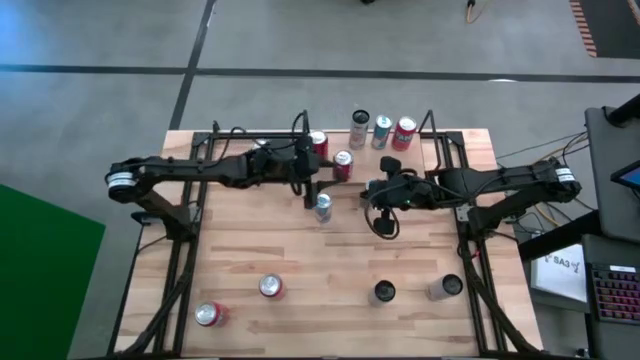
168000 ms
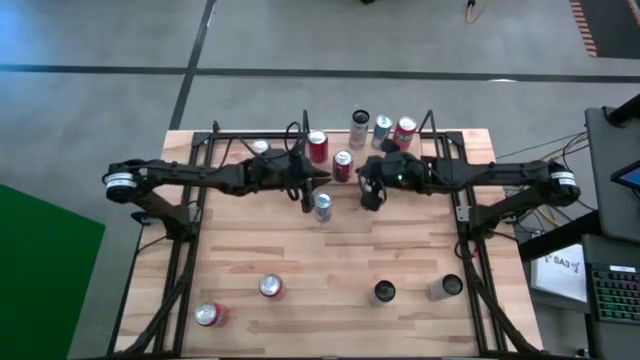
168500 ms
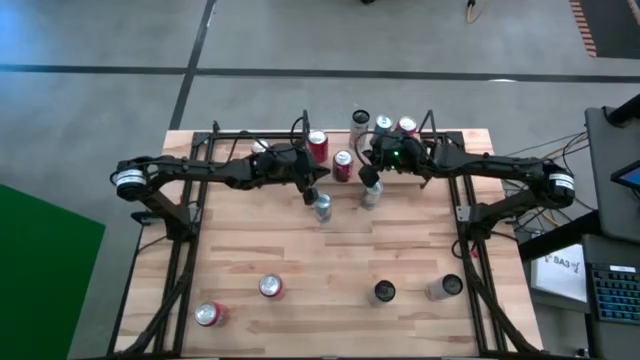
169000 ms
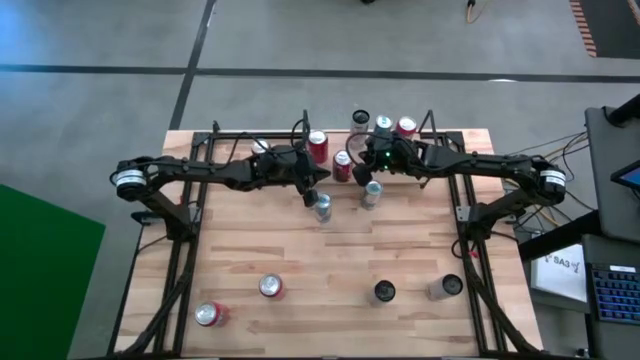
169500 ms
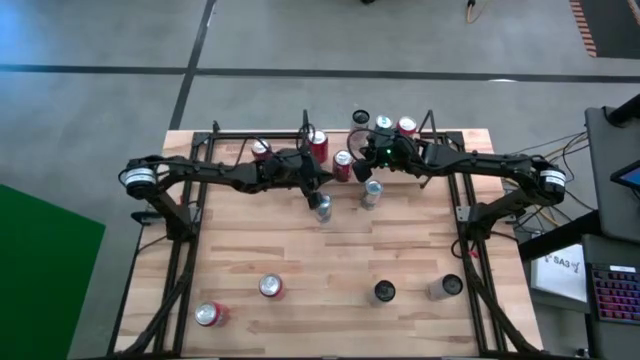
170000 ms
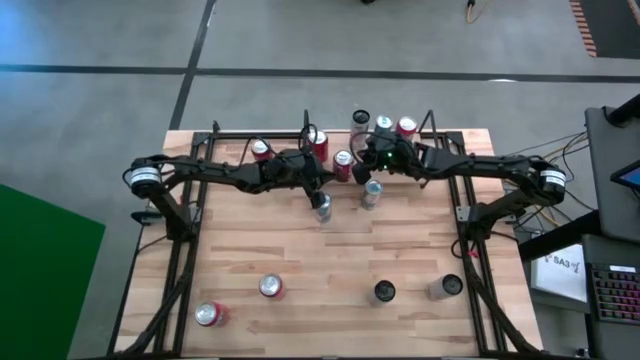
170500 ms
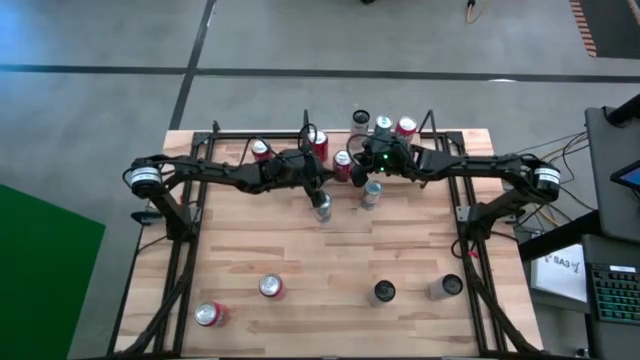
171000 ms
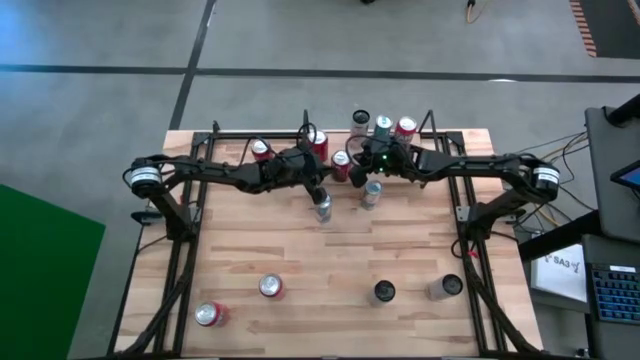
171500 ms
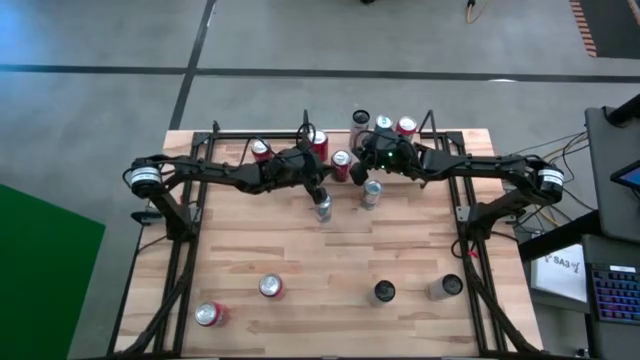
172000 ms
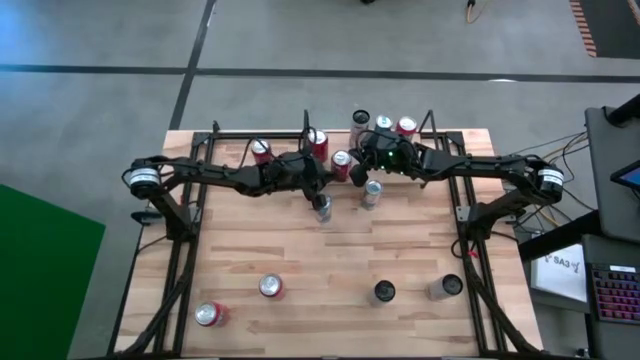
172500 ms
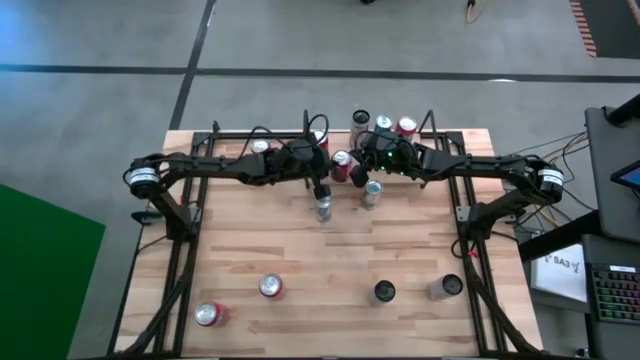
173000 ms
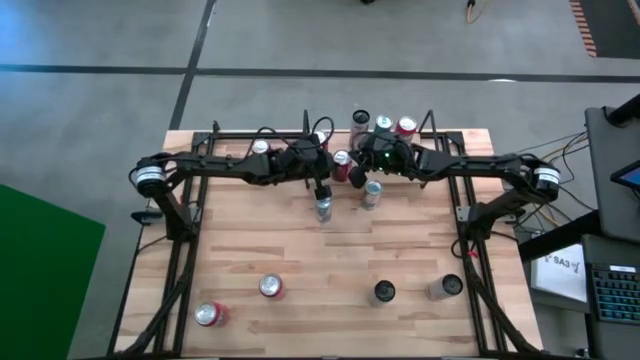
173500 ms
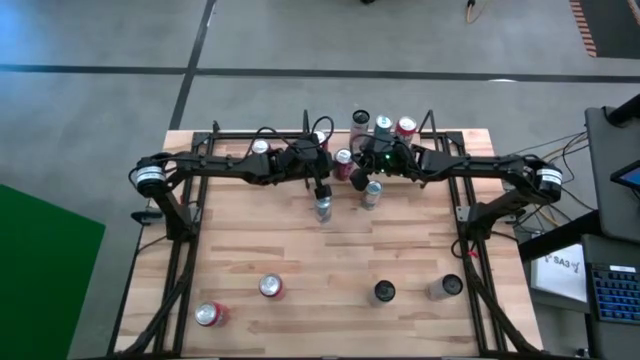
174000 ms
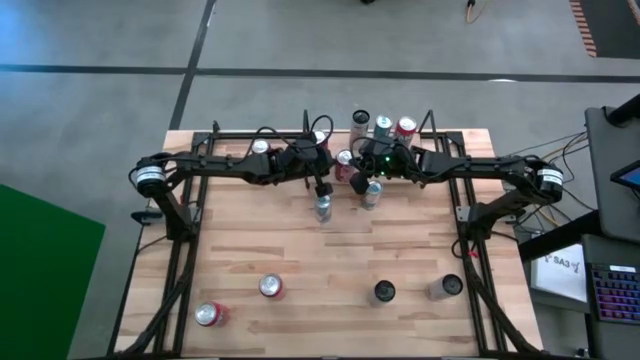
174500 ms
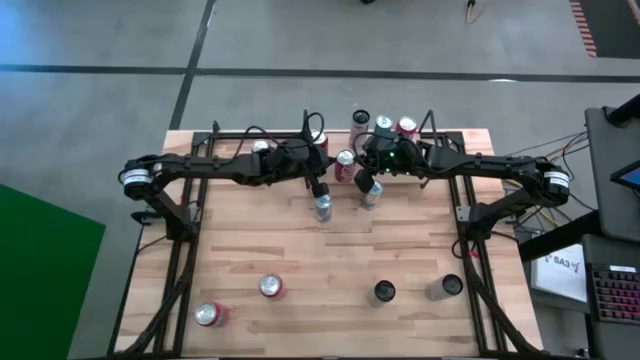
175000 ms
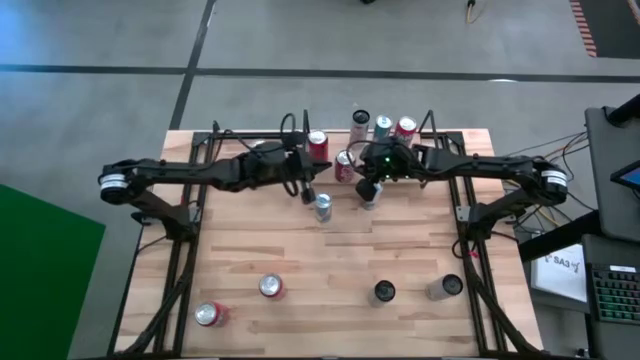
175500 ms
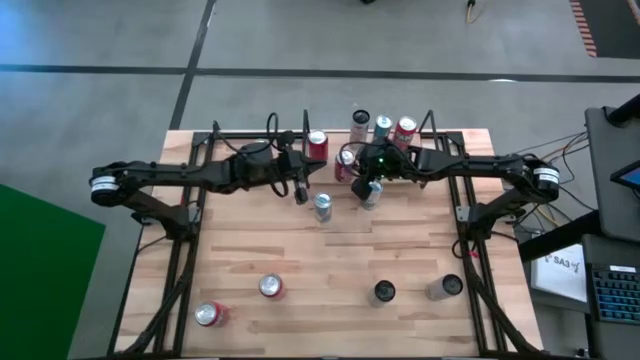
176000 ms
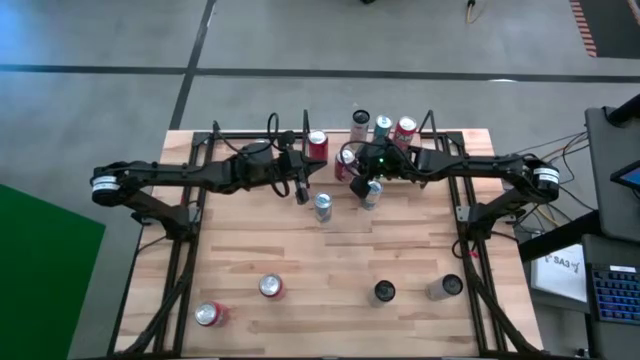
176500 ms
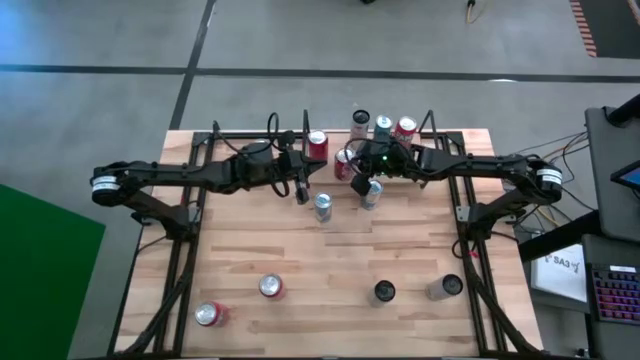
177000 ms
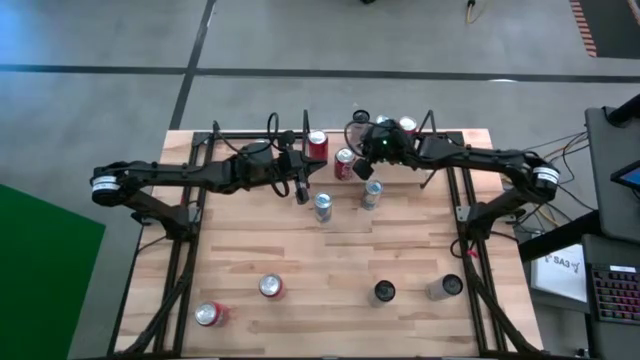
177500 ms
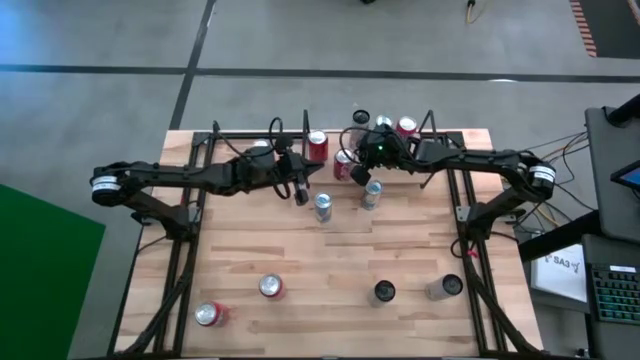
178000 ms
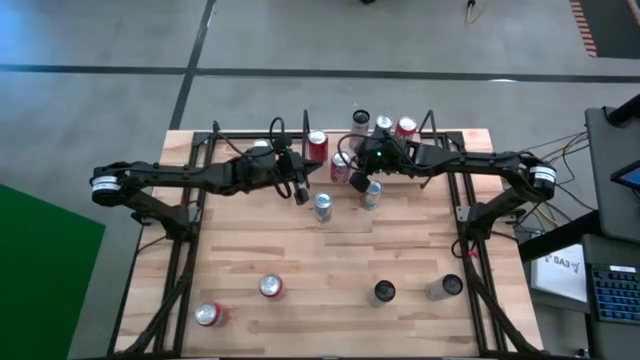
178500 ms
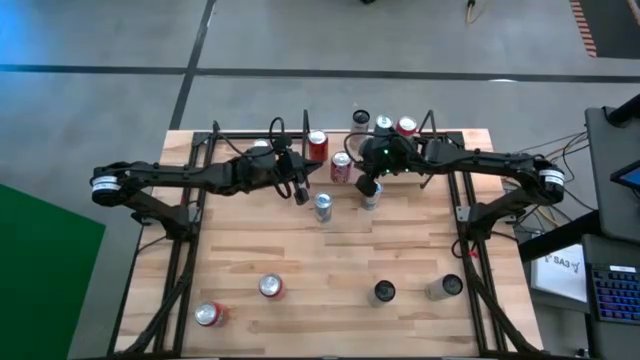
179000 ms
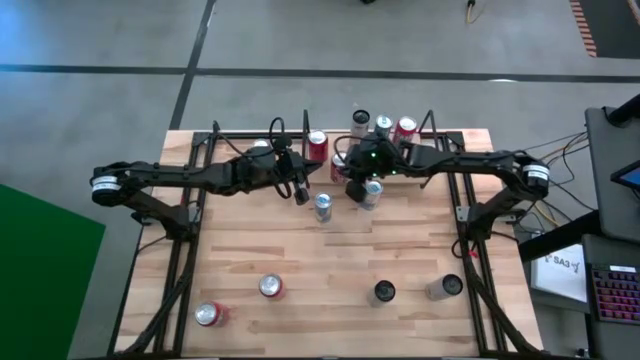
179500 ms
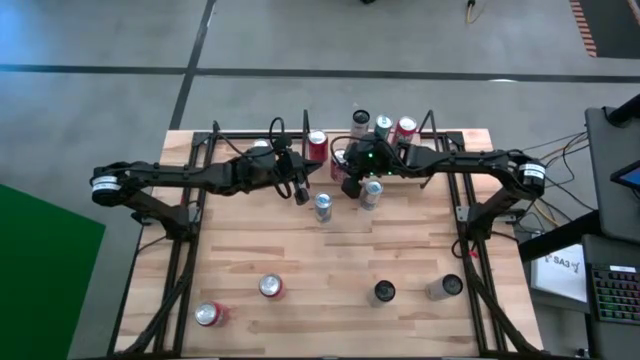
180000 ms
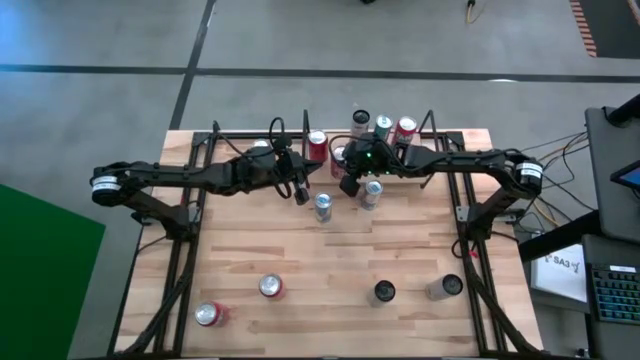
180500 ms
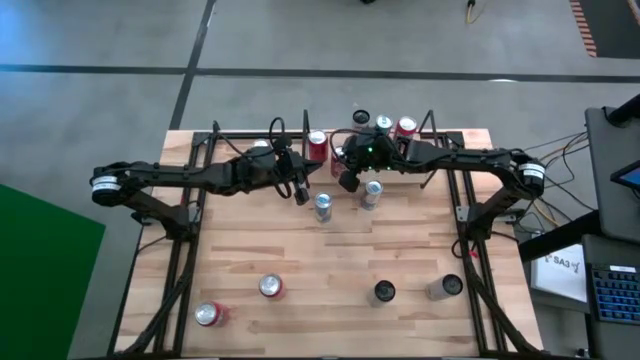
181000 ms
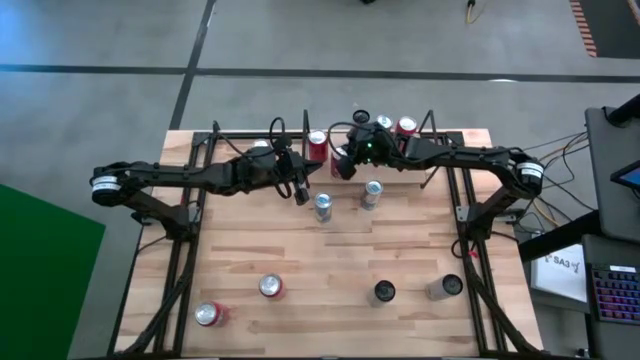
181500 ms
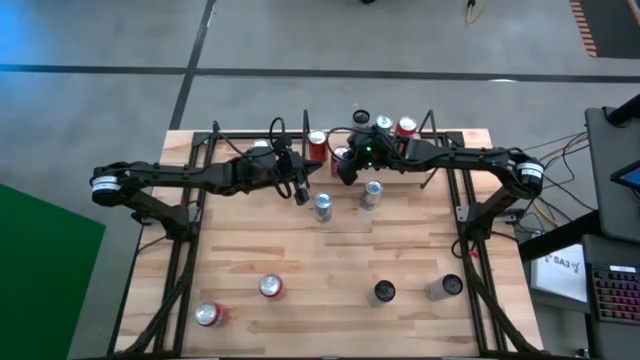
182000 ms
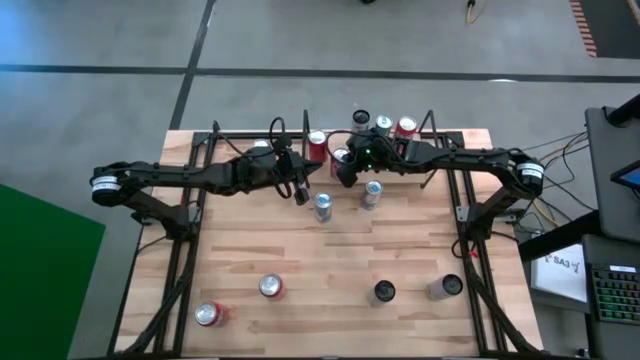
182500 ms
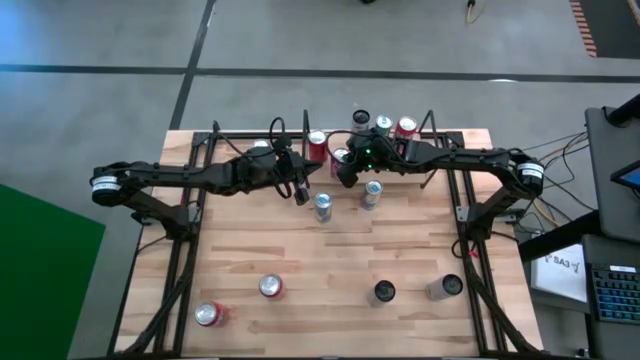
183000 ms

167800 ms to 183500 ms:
Task: Place canned beverage on shelf
Put the red and white soda can on the shelf

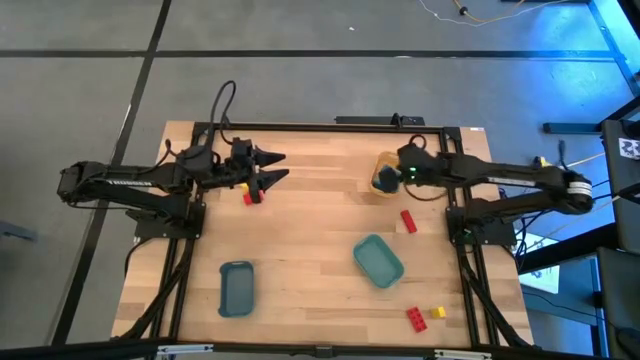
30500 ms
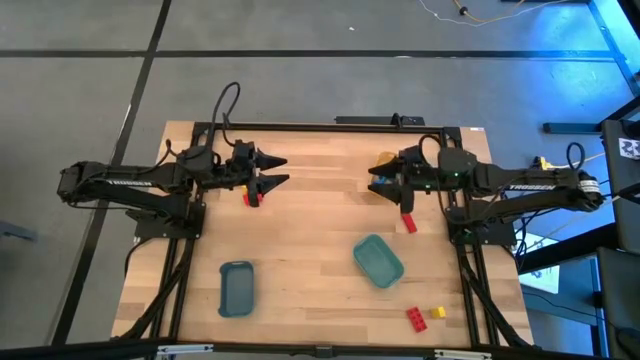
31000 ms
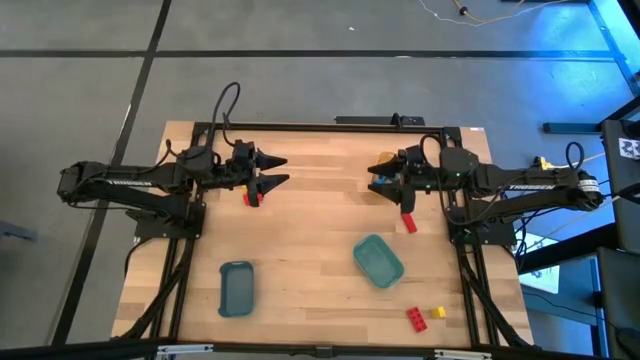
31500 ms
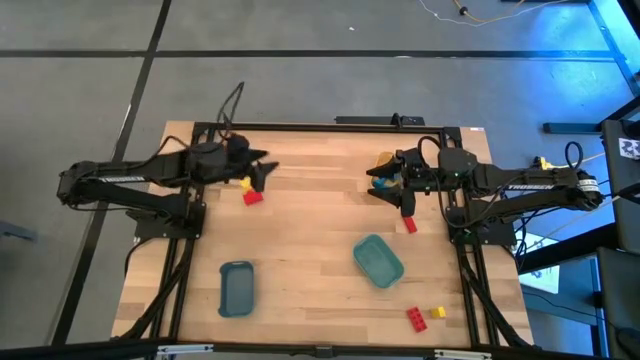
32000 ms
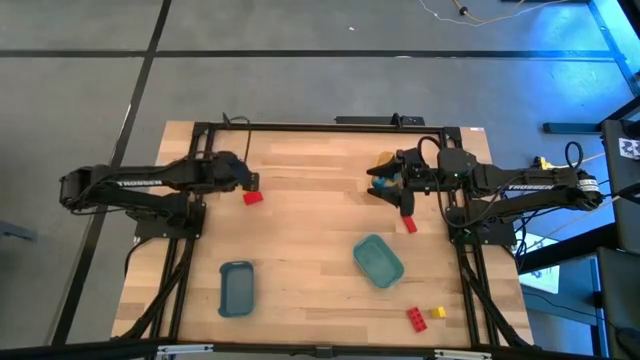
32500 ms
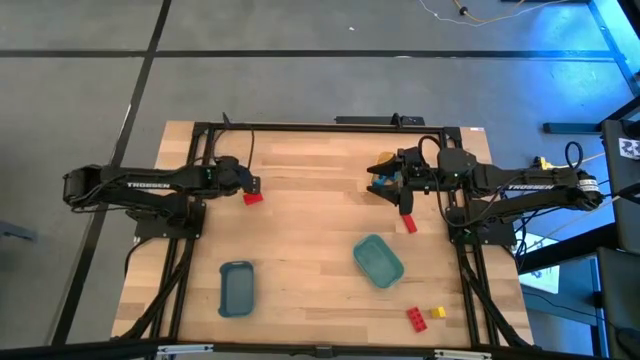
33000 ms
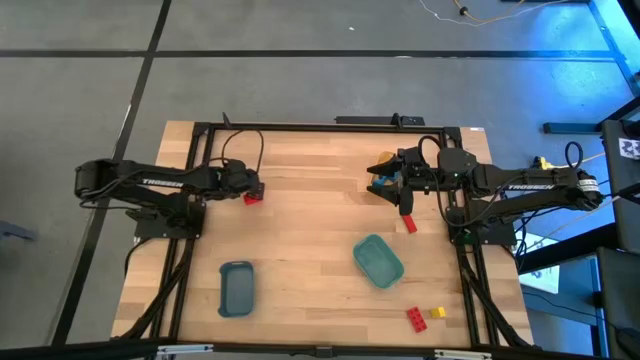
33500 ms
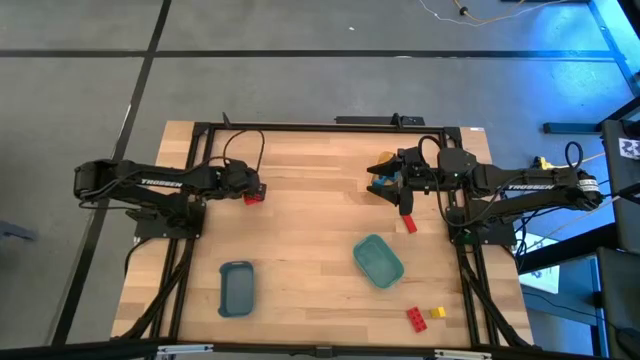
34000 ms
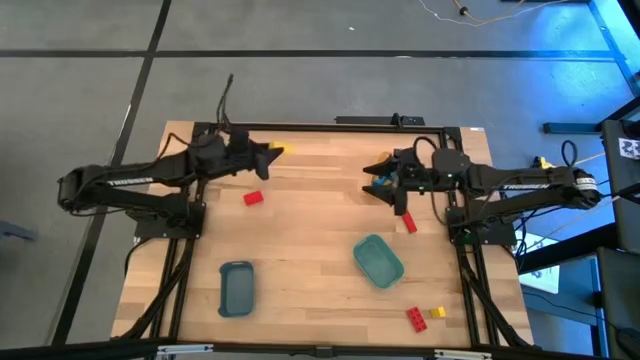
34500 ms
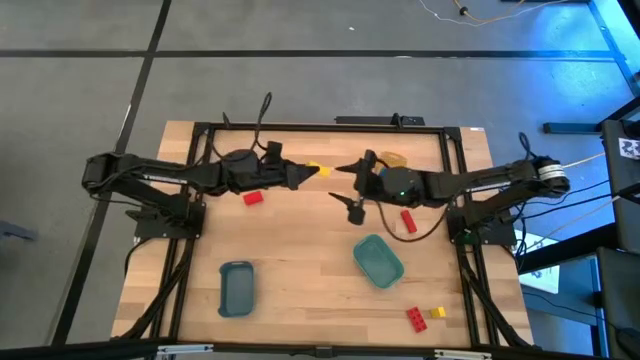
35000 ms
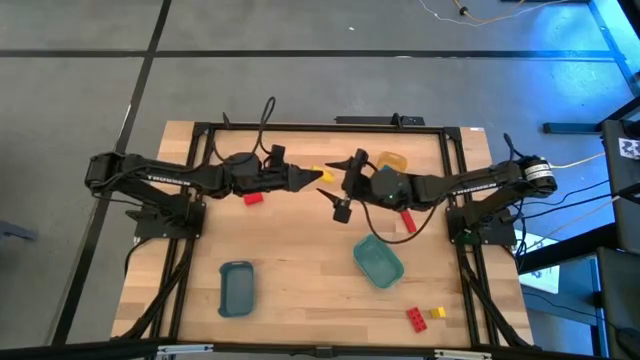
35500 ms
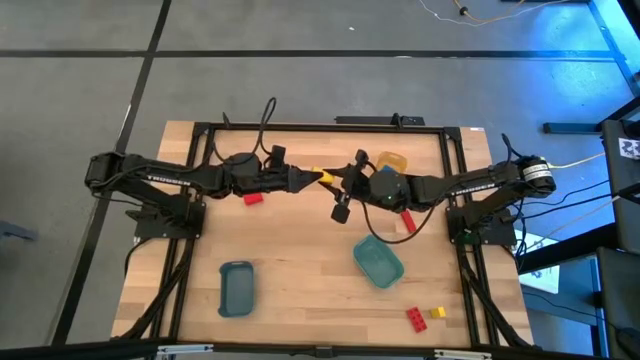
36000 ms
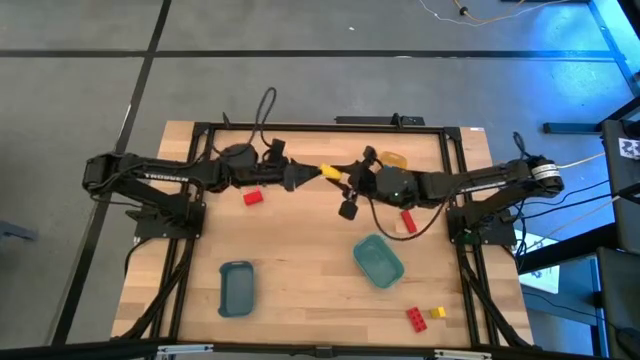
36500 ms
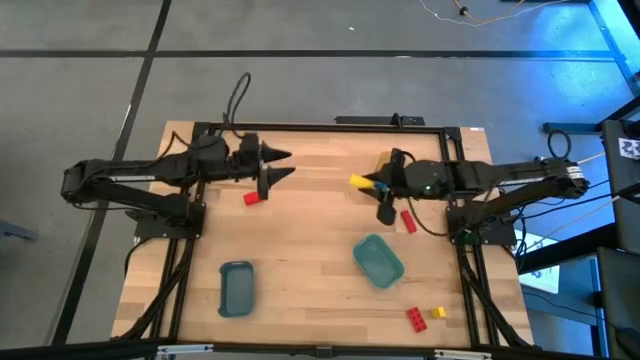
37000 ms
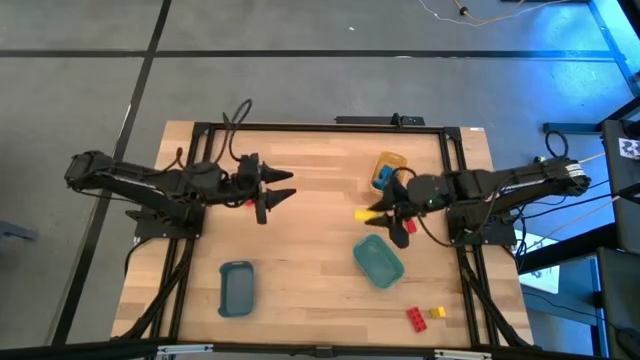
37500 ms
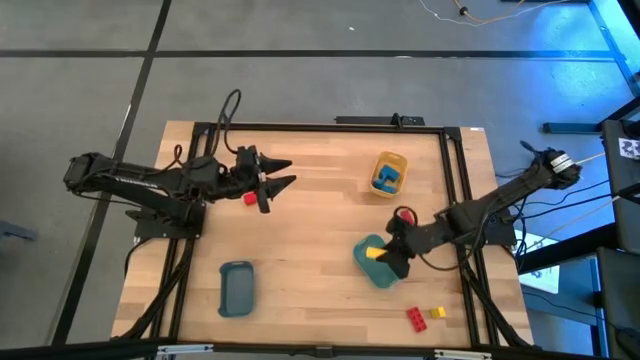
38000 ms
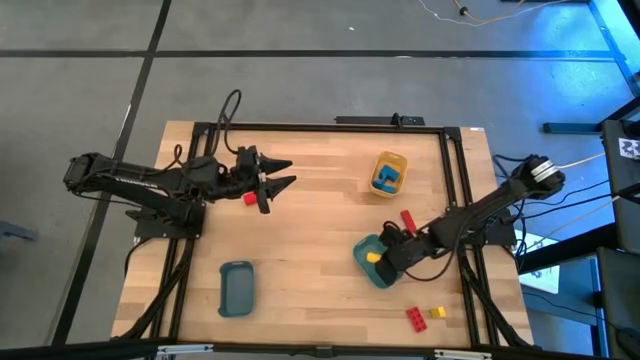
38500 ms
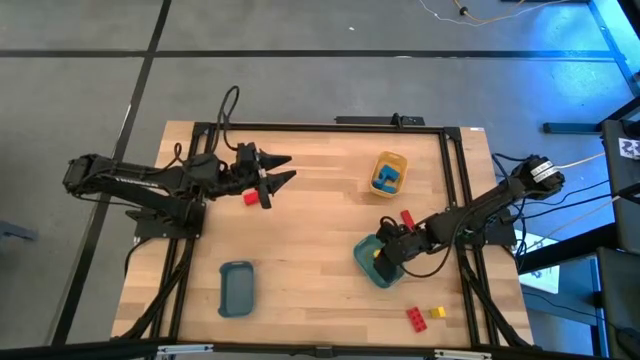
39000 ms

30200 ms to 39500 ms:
Task: Sort & place blocks by color
Put the top yellow block into the green bin
